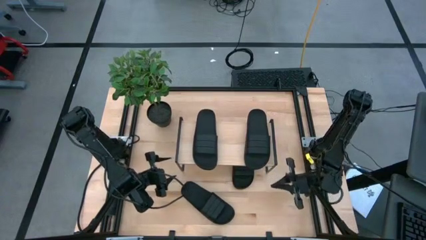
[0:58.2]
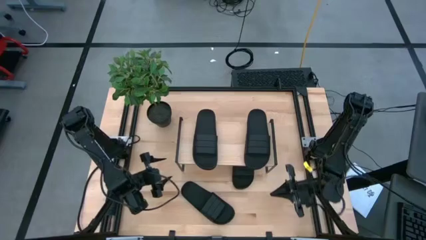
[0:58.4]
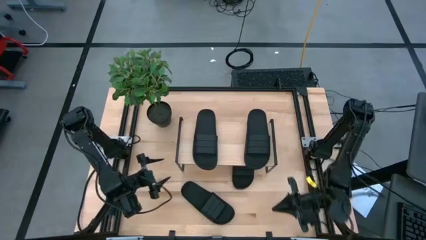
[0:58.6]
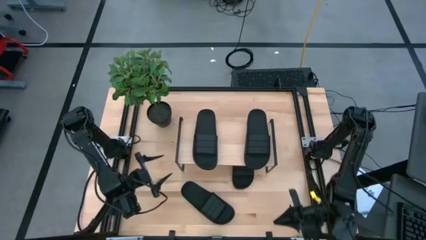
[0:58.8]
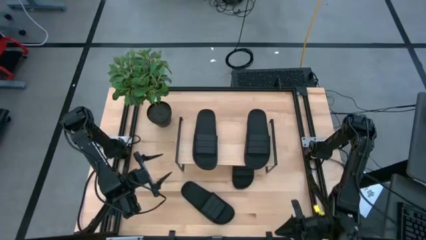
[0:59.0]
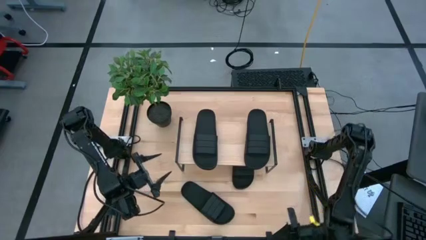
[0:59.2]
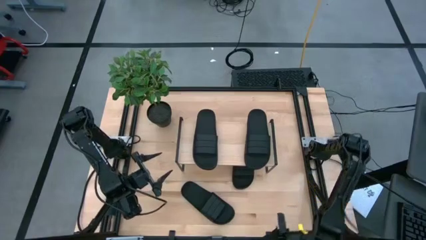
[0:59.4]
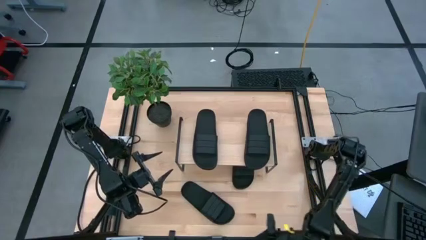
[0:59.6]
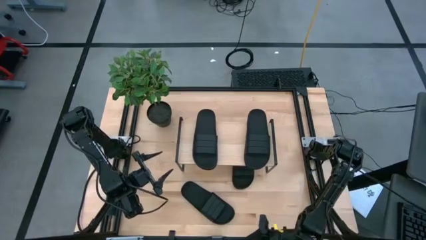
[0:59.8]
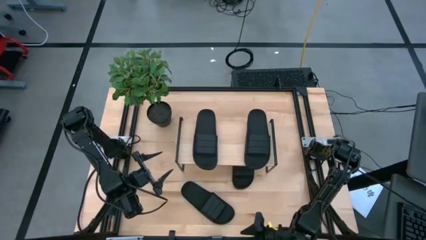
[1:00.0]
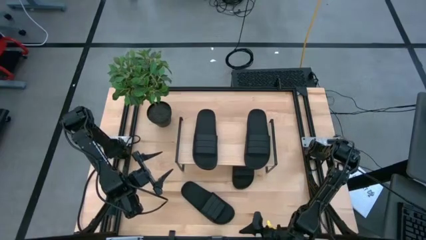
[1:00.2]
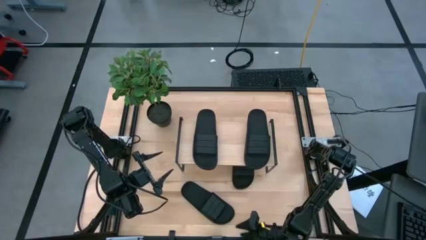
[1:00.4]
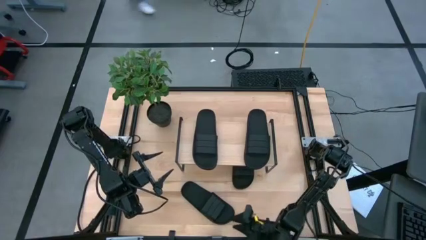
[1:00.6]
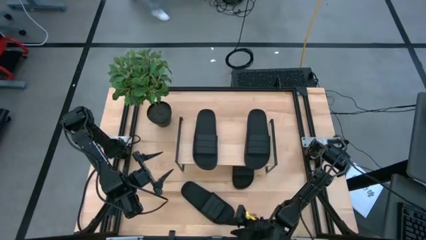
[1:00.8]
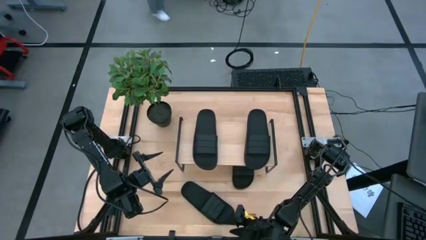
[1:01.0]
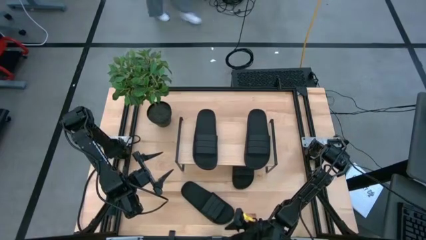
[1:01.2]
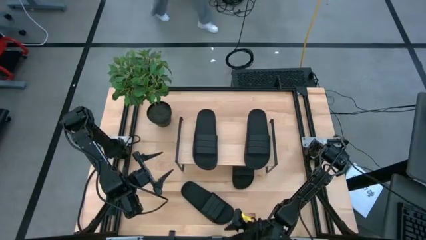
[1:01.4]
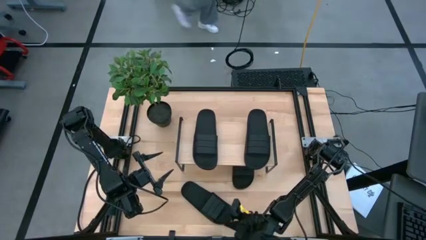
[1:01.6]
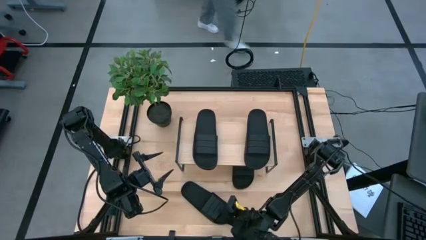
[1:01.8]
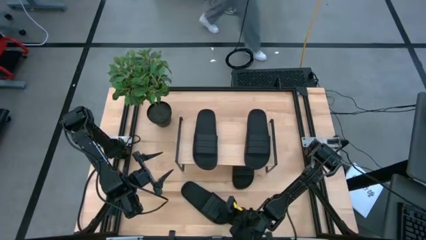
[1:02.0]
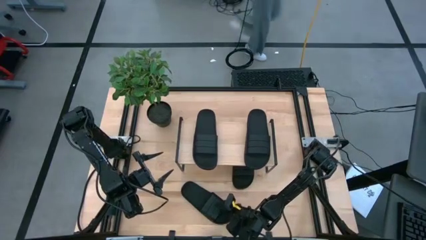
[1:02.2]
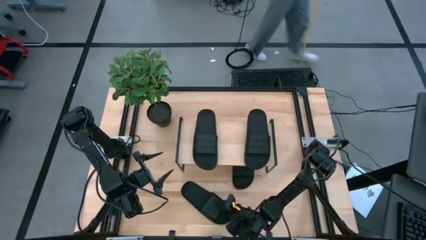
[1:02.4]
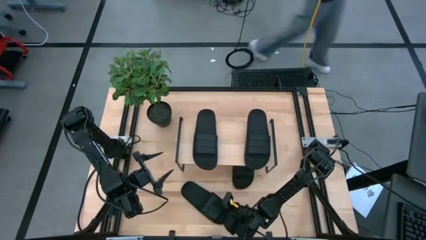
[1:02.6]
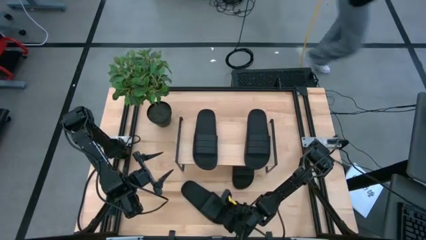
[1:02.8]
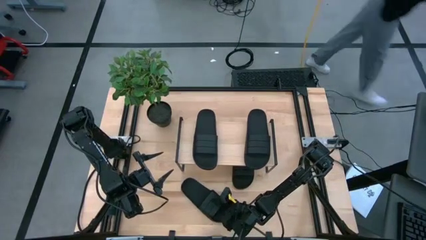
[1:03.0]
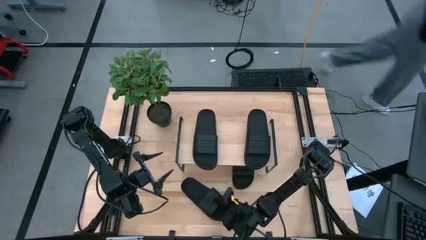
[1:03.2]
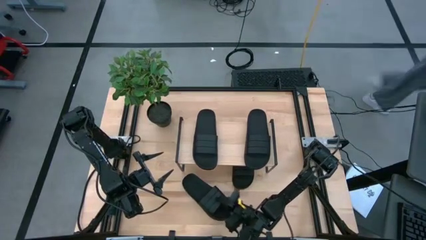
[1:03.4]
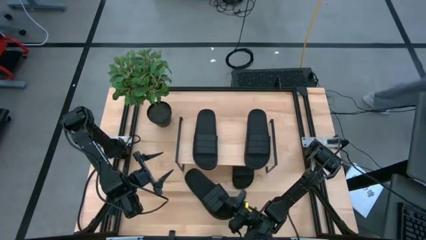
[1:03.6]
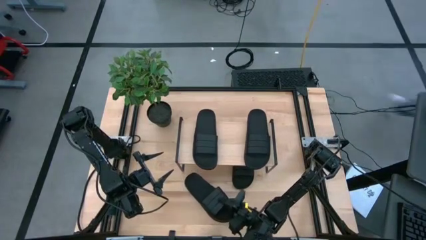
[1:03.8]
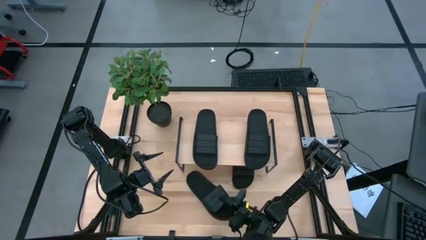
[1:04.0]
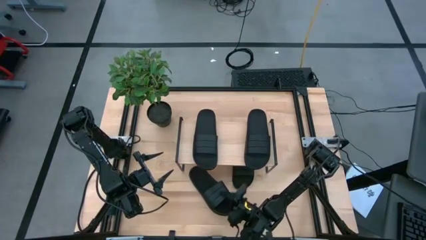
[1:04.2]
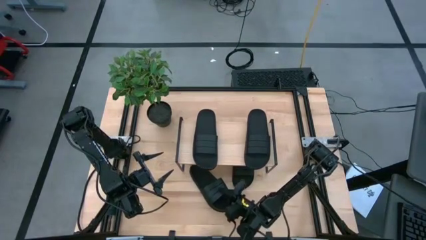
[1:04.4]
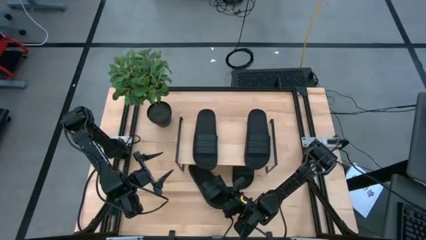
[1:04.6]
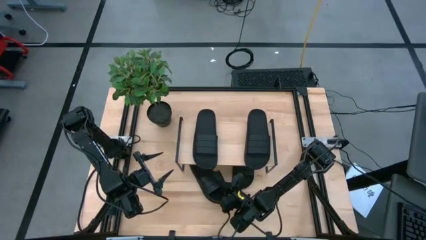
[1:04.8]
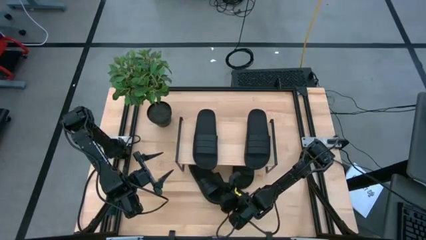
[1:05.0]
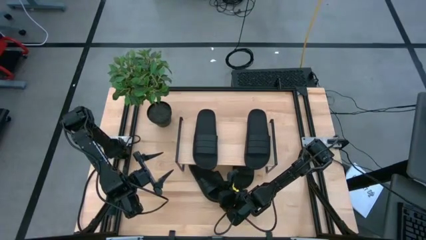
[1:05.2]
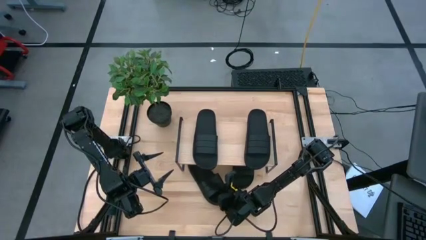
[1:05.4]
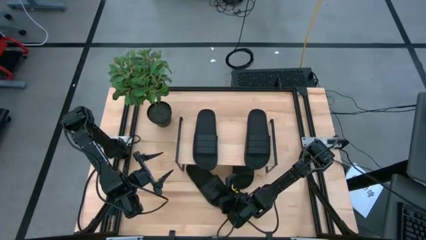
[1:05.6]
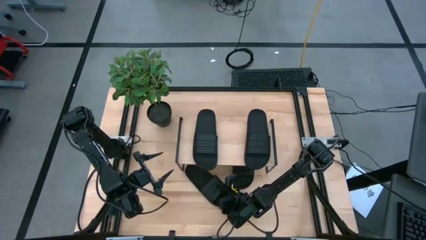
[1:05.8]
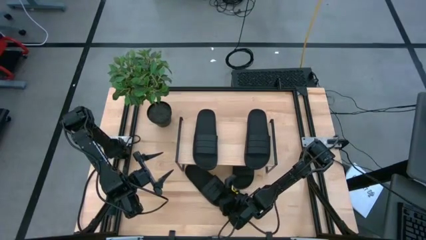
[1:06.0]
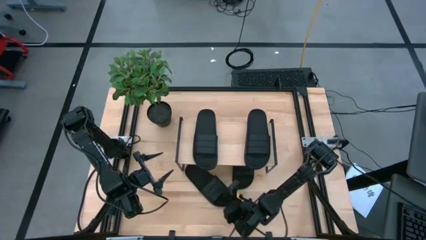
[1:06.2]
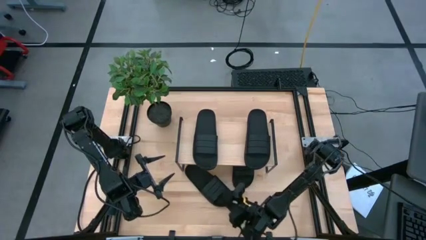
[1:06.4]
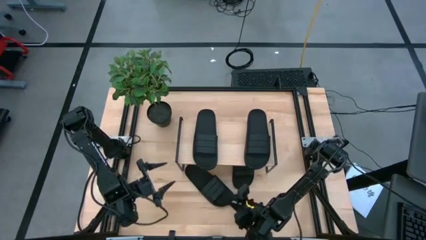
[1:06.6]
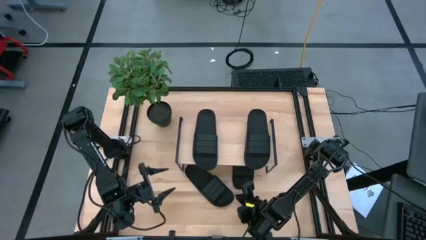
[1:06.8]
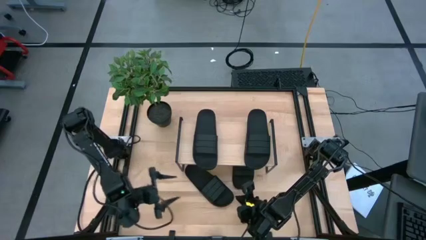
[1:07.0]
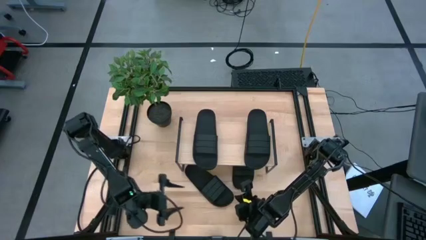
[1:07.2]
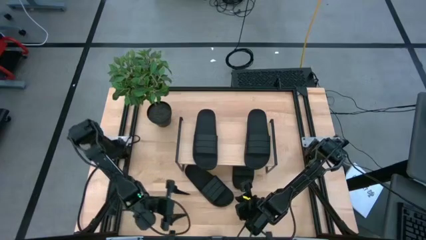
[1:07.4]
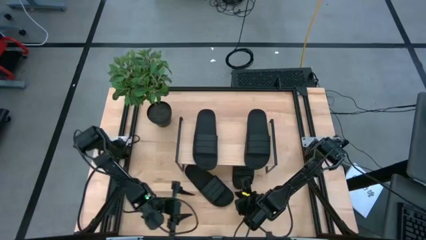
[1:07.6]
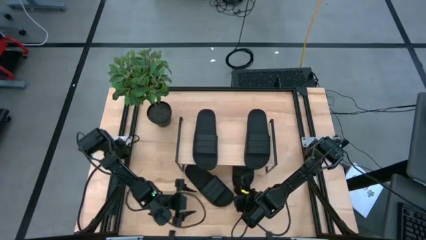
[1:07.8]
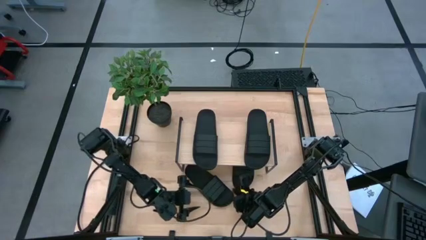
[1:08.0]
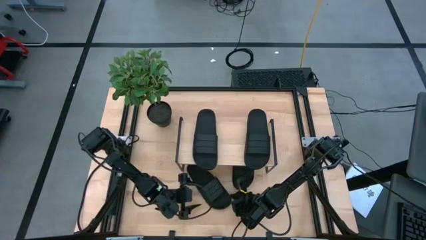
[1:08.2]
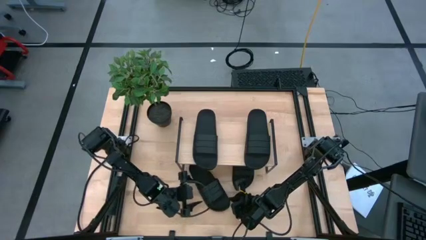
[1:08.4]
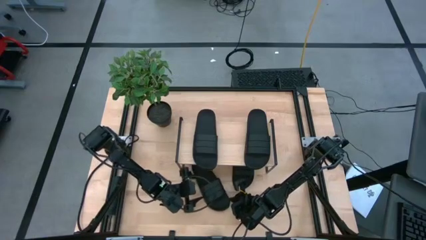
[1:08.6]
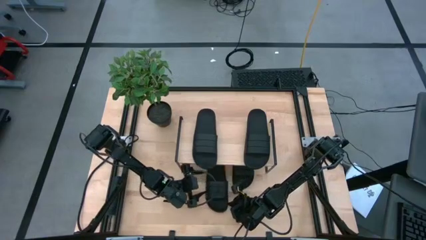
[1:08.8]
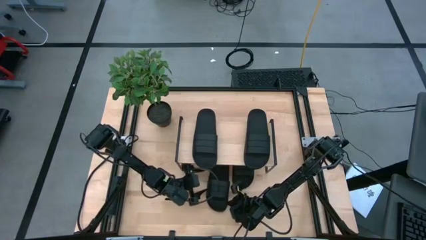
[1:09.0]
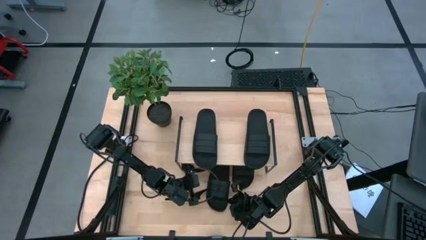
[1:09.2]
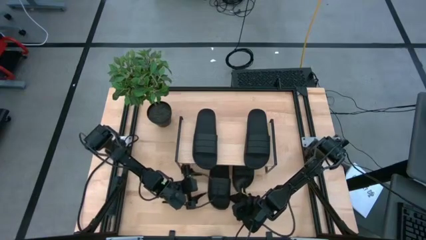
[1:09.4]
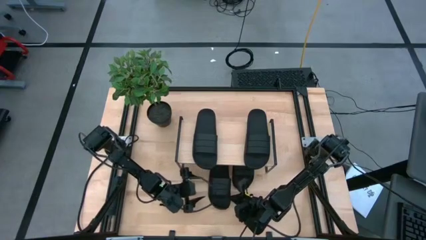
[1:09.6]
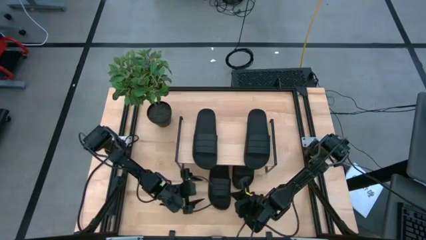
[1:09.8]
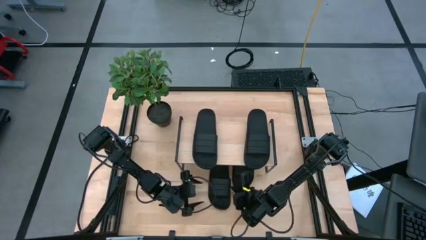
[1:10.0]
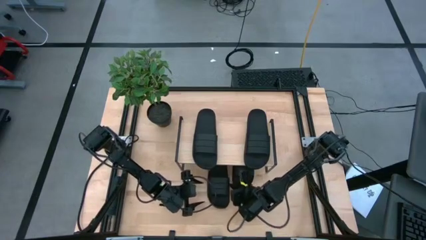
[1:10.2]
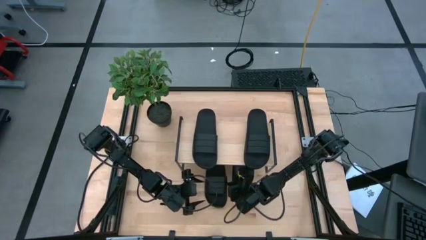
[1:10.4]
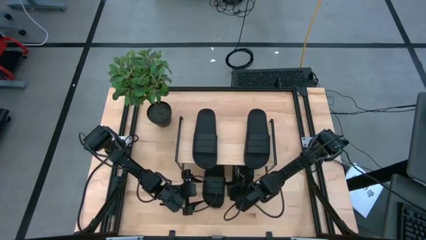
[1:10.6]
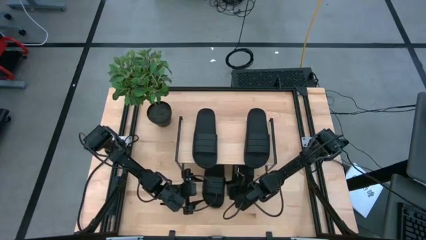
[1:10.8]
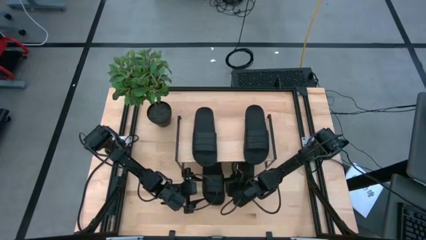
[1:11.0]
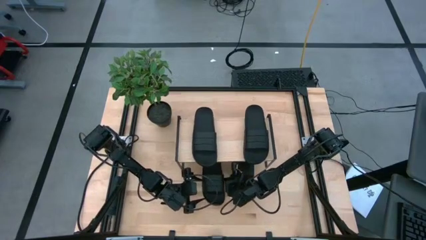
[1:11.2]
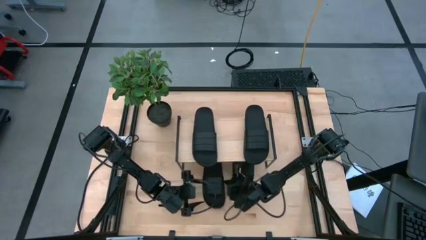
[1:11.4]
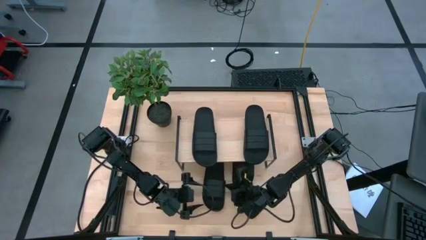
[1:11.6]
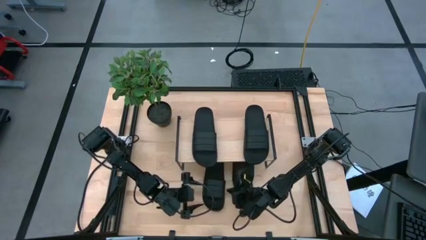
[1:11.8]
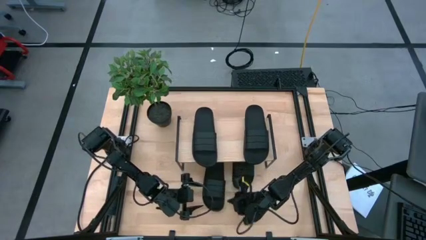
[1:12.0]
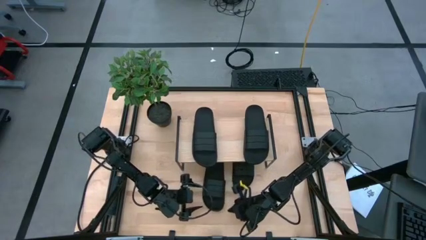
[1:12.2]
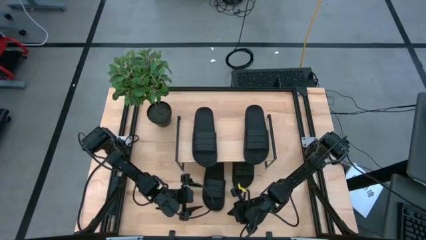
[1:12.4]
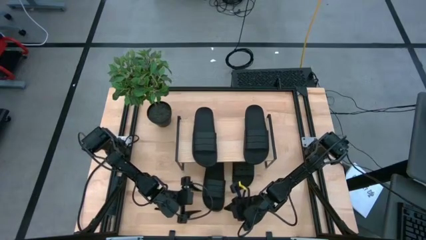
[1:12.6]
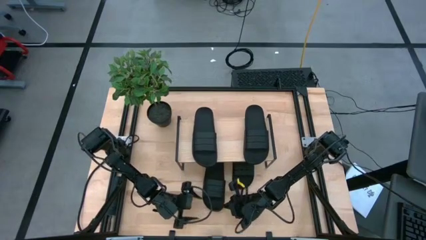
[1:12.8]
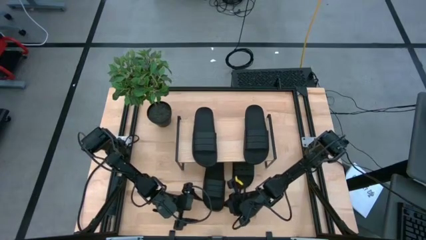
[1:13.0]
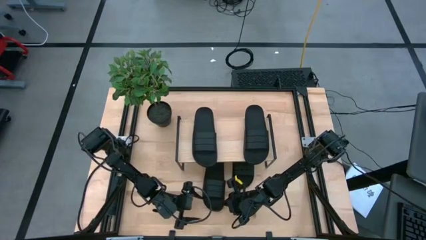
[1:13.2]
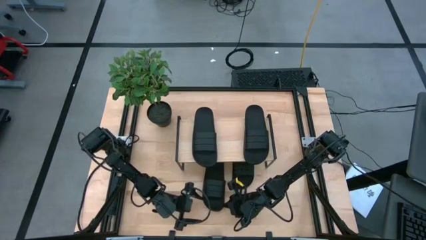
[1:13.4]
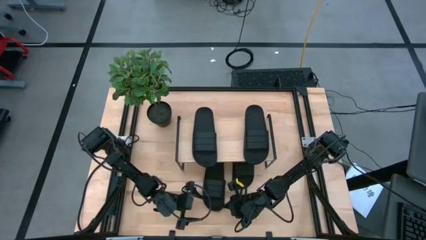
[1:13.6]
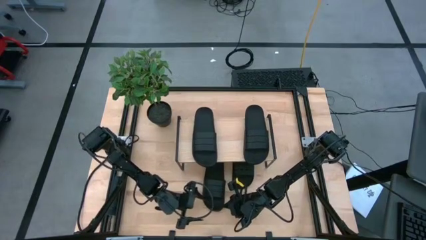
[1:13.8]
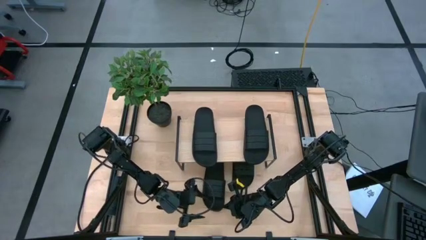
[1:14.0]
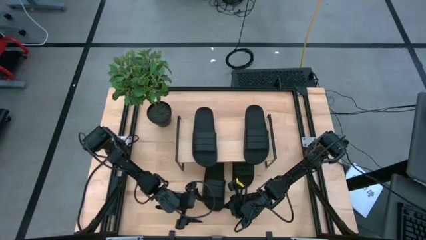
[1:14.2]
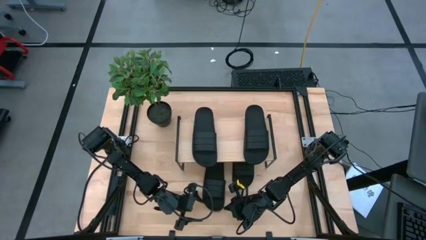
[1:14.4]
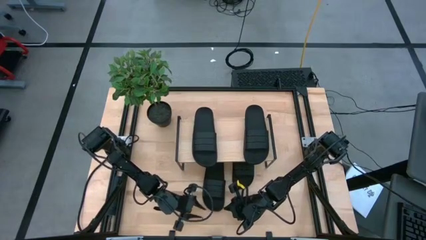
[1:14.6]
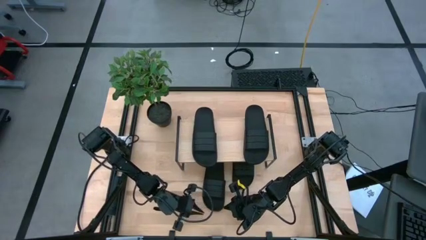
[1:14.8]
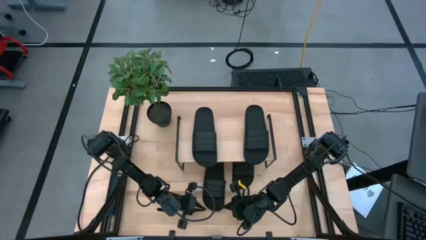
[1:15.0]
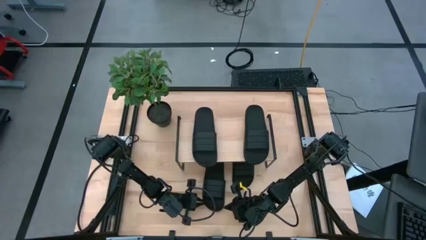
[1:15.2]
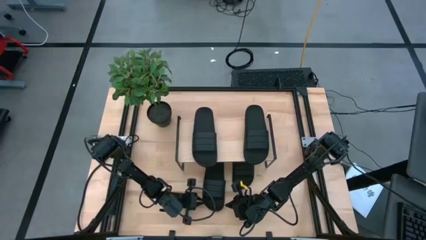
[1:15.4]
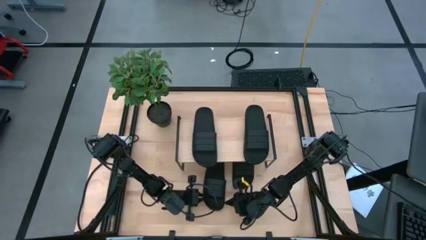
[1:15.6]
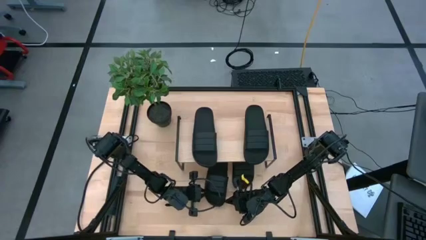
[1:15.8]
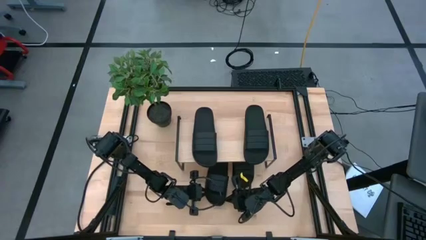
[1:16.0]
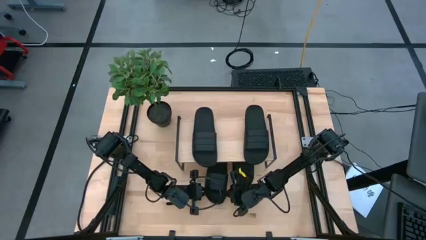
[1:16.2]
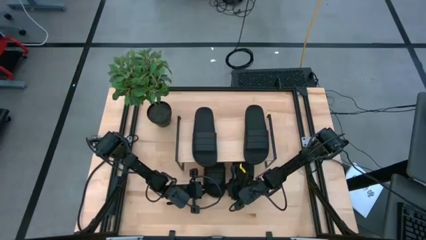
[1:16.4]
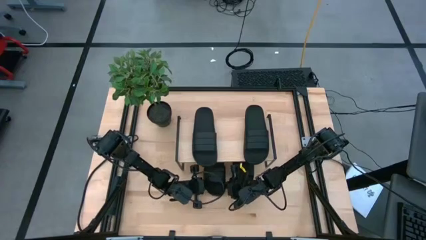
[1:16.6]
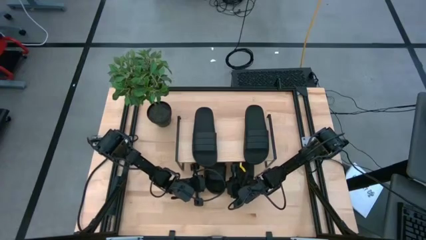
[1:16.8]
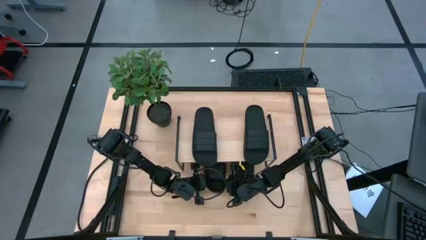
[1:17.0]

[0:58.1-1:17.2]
Task: Pick and place slides into the shelf
Put the black slipper under the shelf
